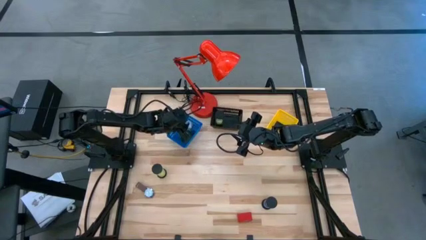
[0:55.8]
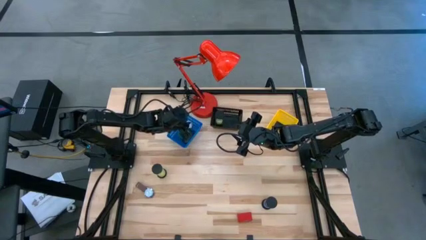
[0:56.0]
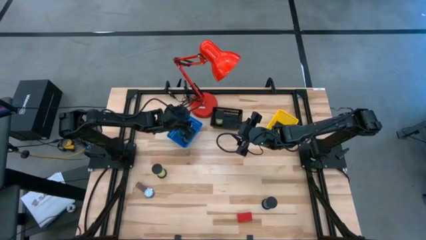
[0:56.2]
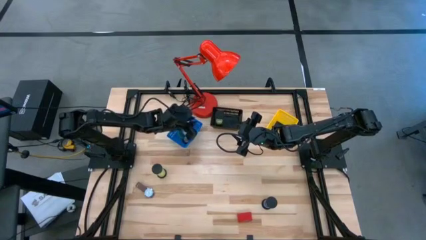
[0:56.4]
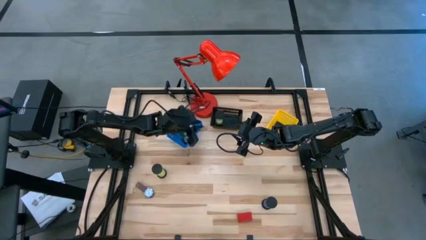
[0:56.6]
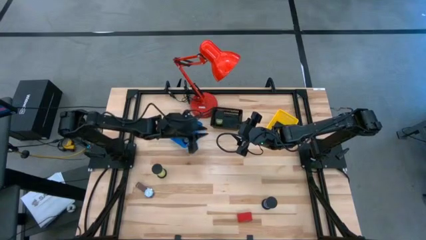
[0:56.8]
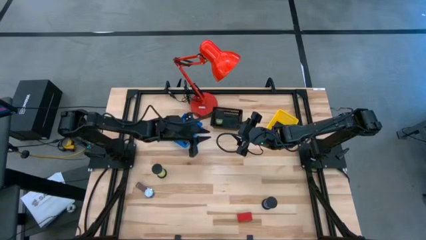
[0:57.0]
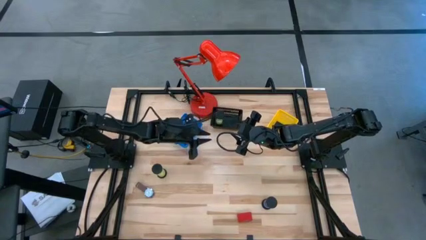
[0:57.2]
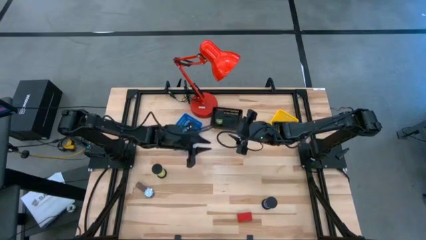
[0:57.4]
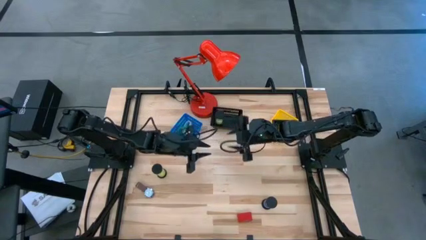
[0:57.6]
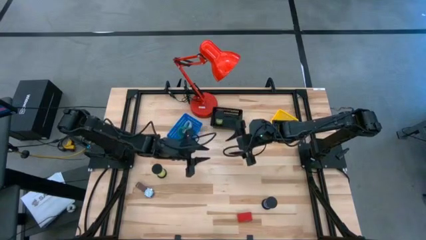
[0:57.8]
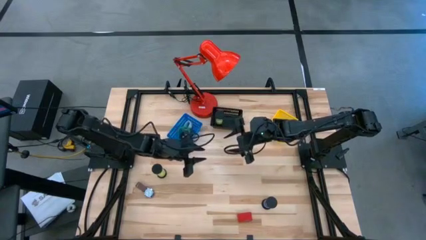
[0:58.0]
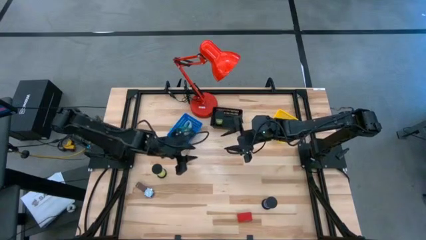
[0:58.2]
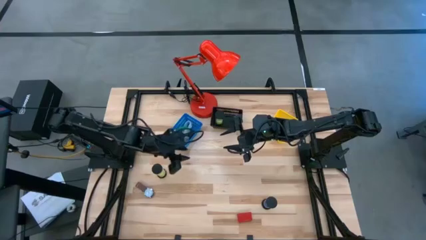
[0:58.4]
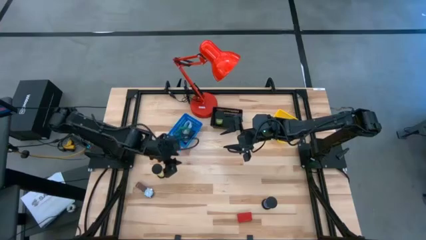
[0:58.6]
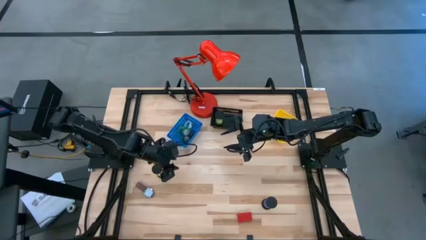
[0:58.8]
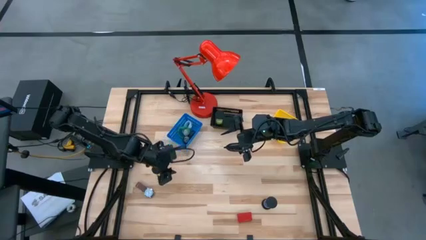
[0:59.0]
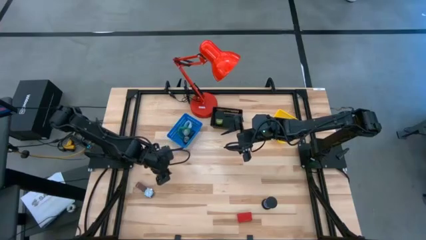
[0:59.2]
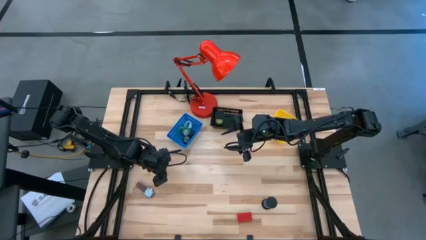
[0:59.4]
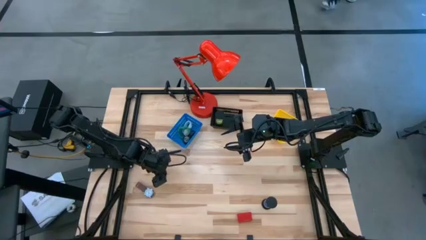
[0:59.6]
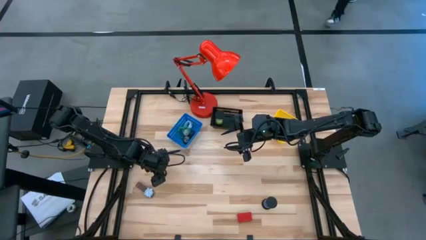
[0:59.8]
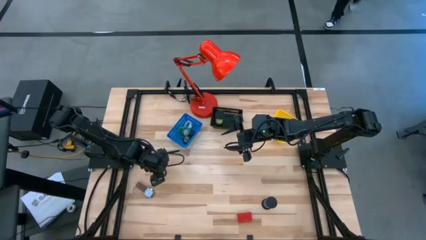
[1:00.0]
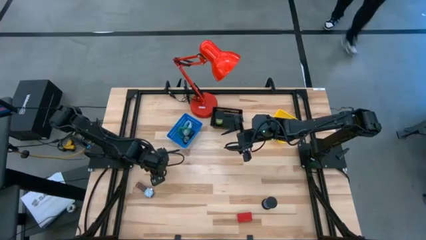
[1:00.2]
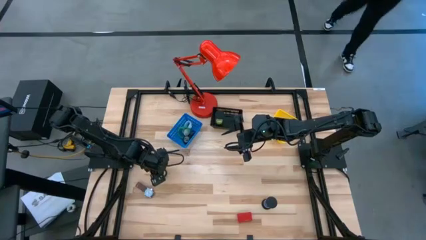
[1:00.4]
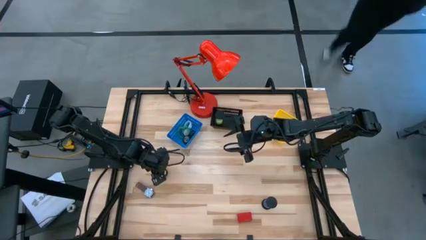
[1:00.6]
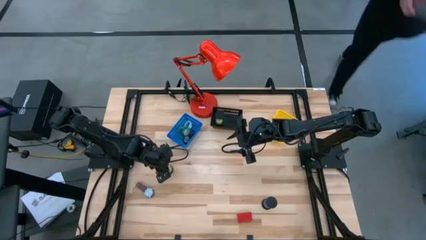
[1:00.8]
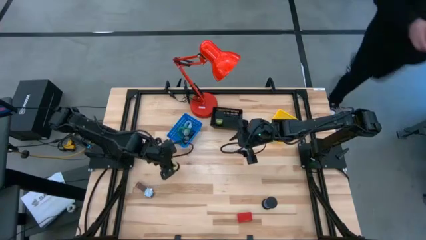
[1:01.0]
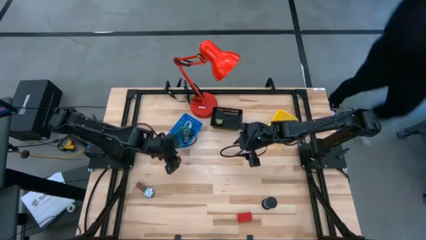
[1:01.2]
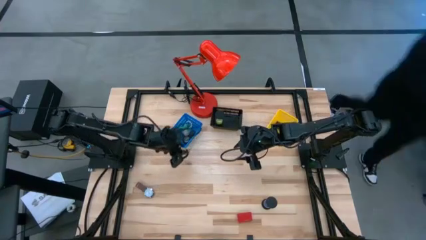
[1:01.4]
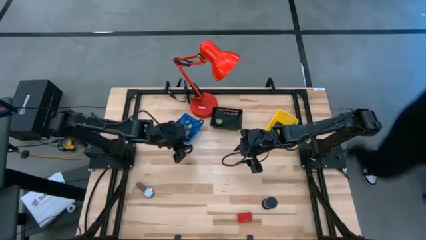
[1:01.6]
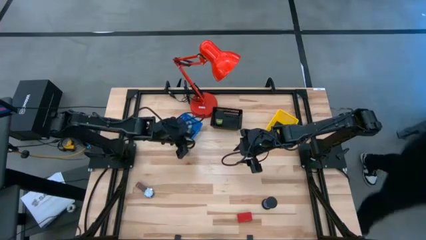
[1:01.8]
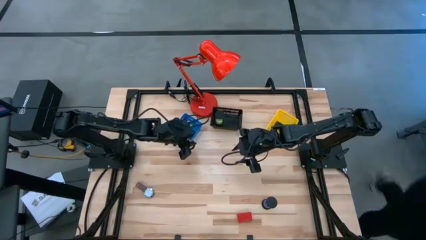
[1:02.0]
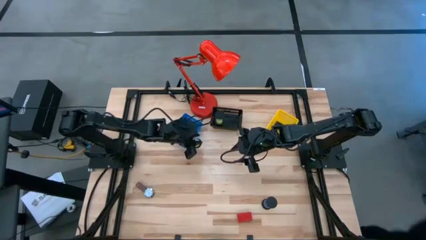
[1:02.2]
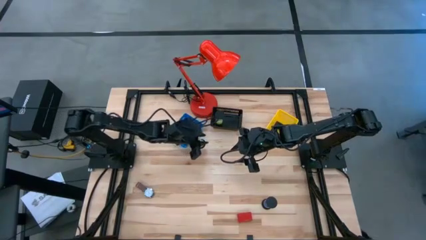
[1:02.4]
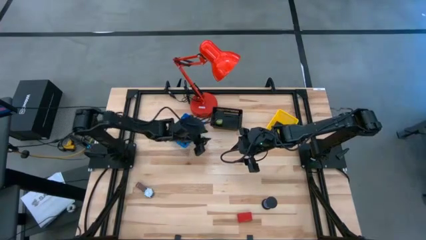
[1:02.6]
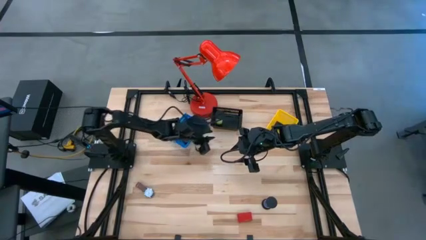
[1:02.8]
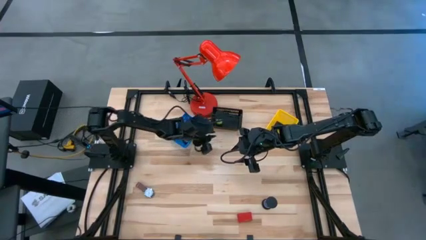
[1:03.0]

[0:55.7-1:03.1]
Task: Pick & Place Office items
Put the yellow hourglass into the black bin

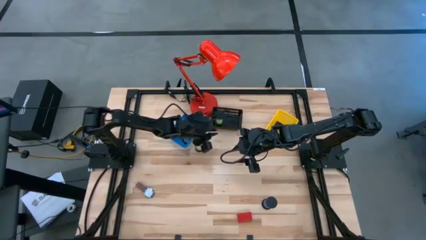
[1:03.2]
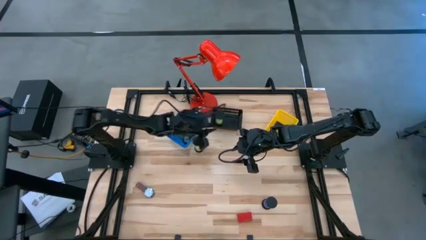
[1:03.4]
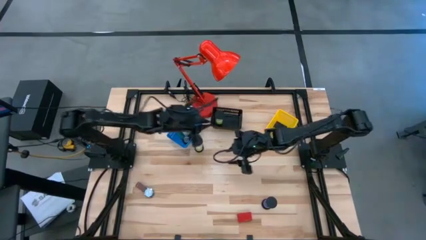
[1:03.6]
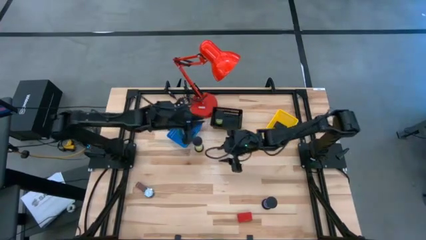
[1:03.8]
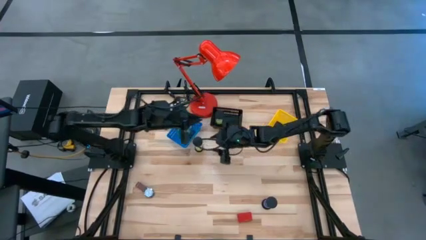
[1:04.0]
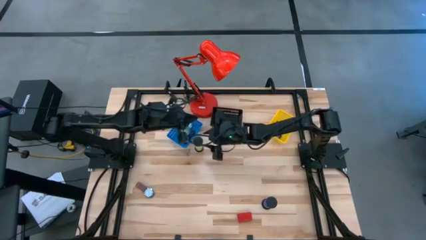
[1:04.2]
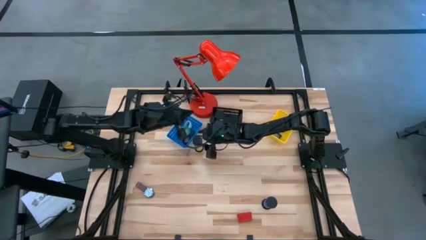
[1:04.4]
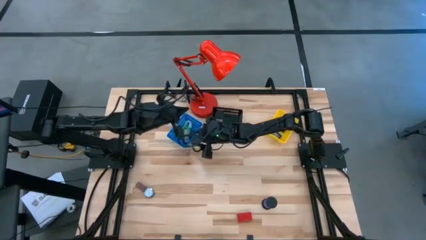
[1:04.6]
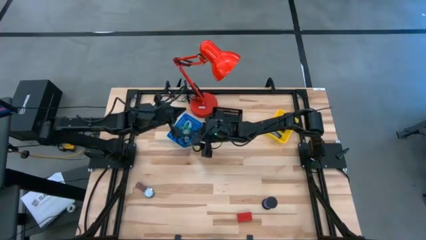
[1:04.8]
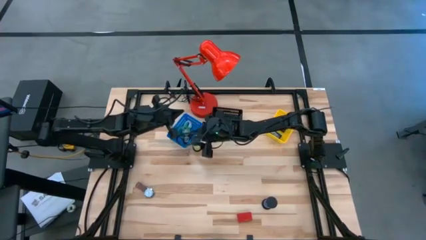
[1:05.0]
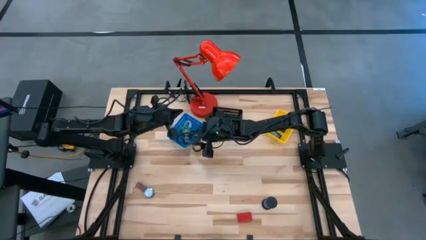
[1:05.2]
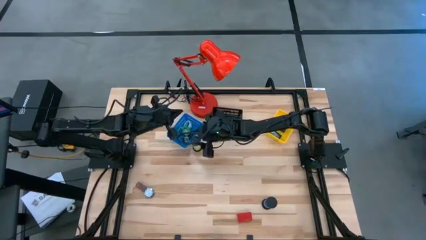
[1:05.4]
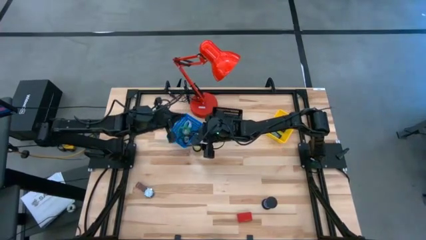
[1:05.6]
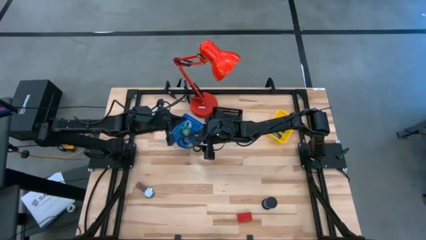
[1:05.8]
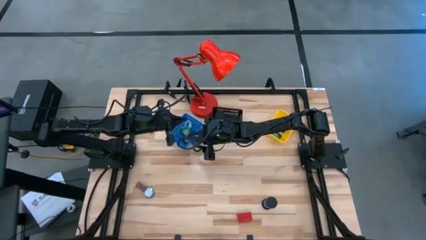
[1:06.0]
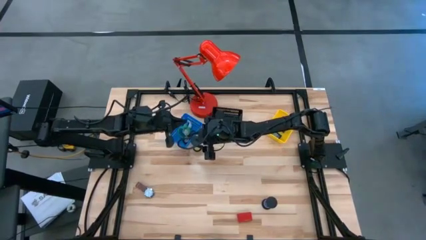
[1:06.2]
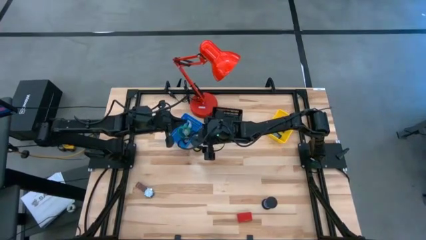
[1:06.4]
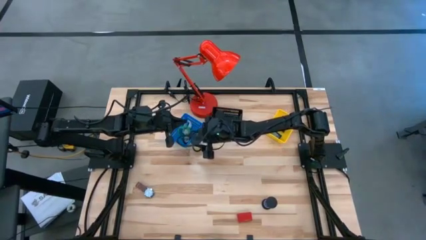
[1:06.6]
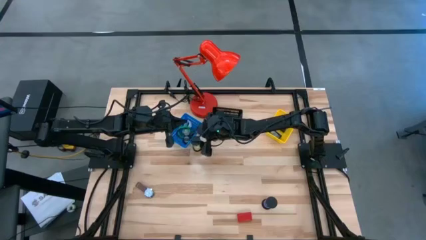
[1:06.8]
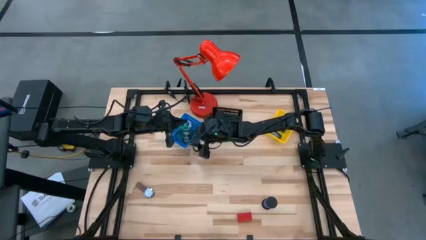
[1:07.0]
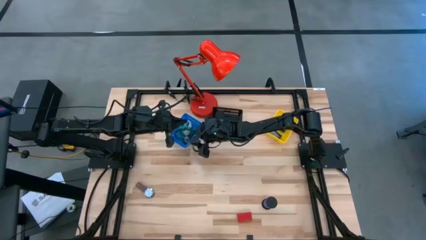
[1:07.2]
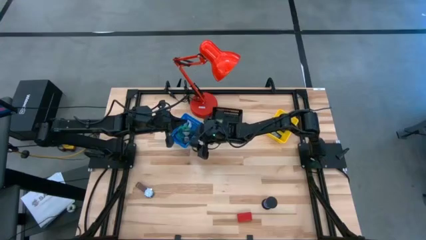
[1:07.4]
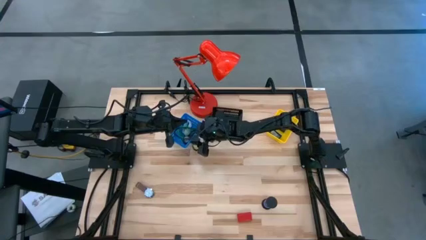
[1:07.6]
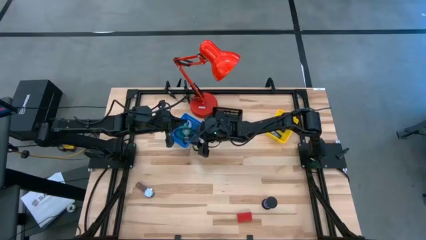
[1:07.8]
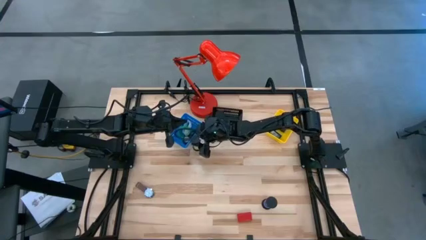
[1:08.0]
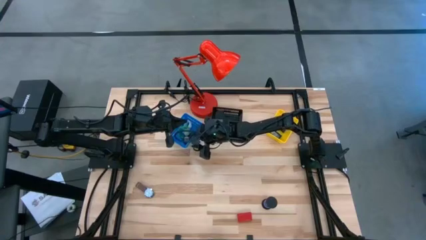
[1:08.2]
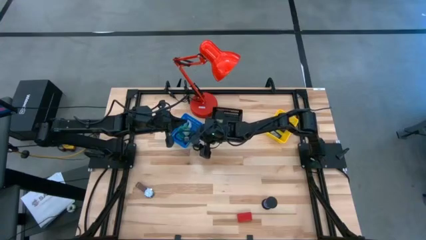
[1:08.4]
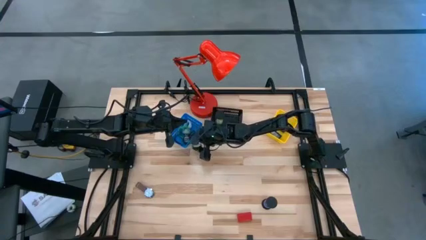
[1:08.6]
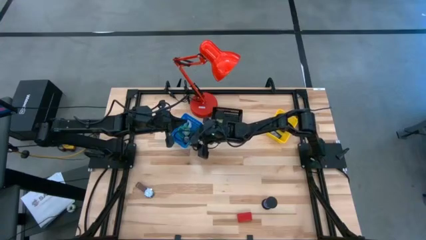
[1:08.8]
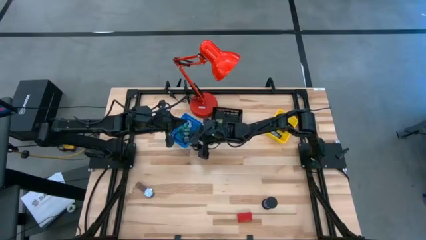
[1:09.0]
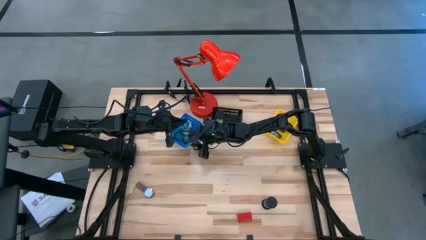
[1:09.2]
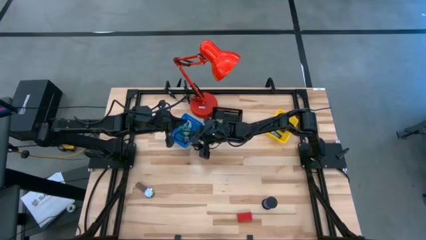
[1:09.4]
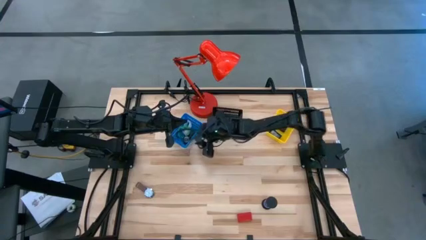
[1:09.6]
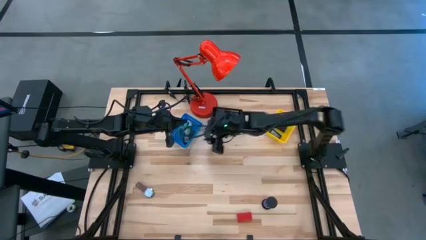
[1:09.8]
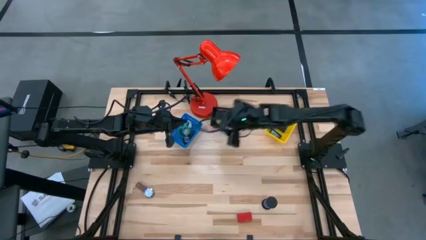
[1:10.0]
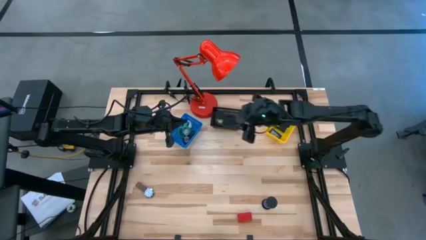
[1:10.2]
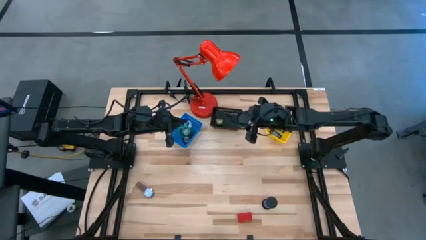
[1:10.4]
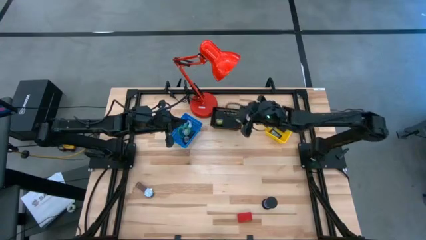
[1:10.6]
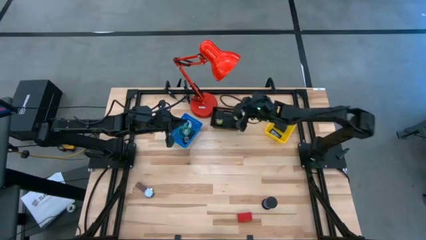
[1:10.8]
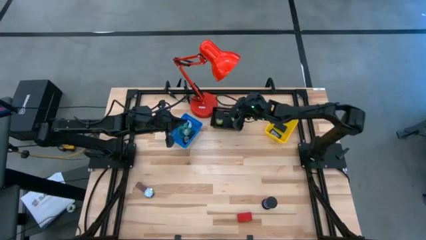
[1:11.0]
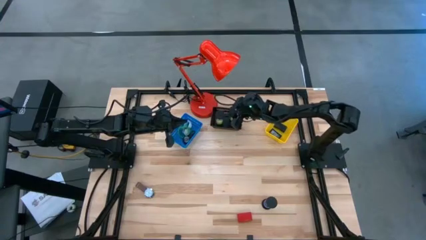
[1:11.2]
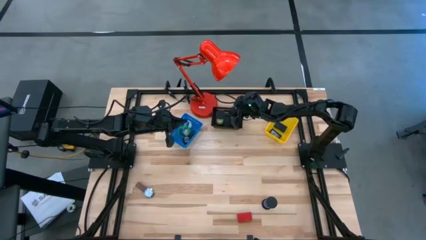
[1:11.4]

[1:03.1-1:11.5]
Put the yellow hourglass into the black bin
